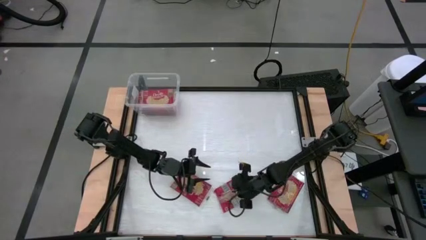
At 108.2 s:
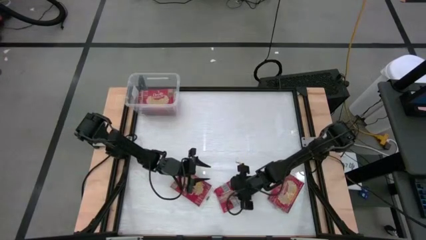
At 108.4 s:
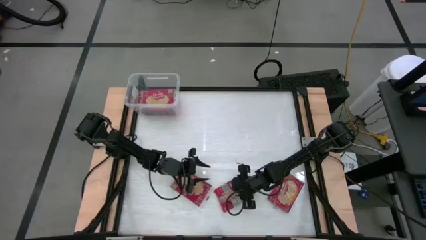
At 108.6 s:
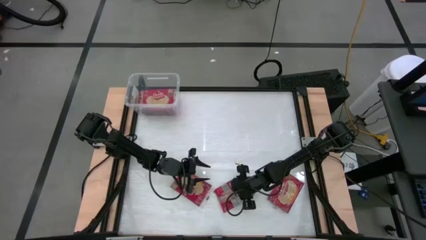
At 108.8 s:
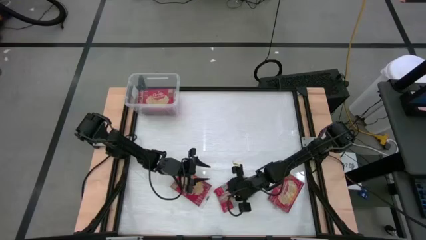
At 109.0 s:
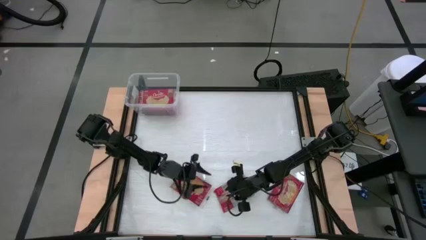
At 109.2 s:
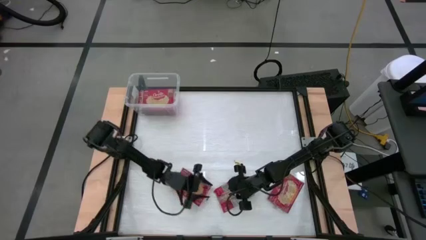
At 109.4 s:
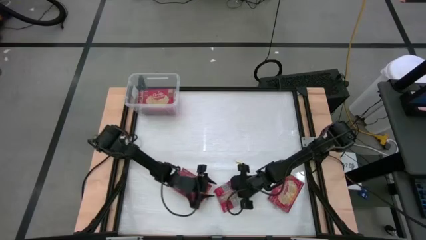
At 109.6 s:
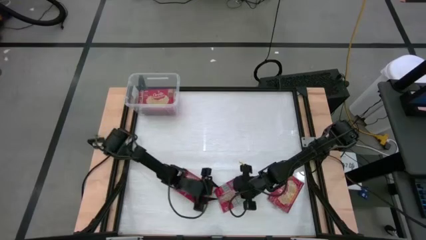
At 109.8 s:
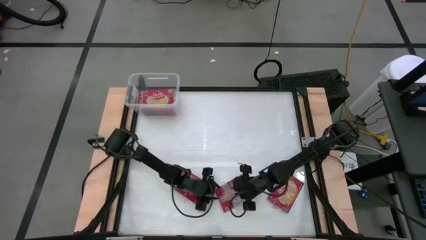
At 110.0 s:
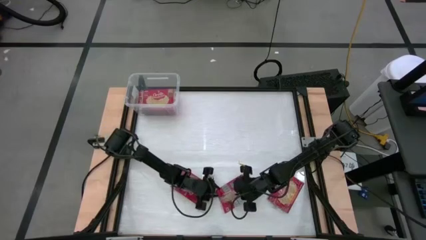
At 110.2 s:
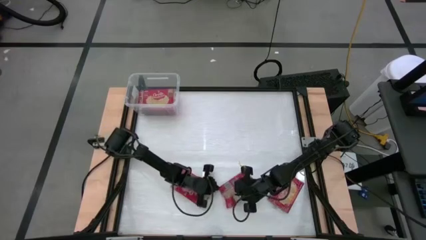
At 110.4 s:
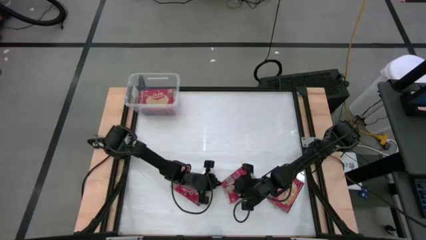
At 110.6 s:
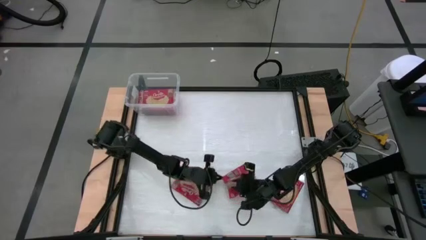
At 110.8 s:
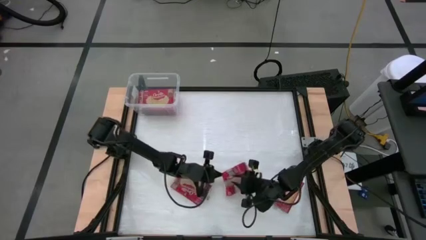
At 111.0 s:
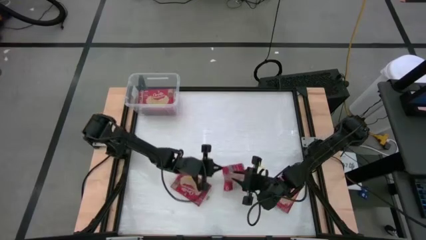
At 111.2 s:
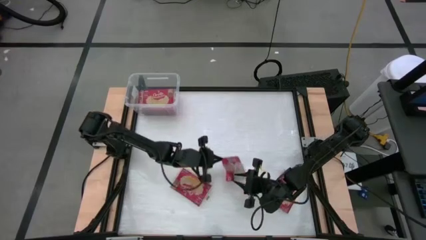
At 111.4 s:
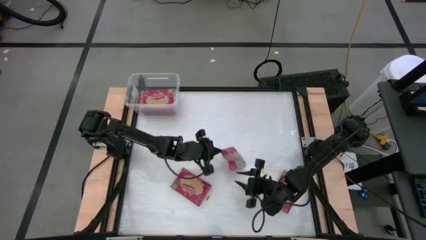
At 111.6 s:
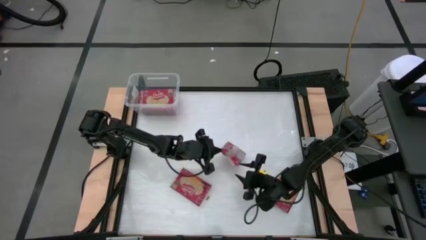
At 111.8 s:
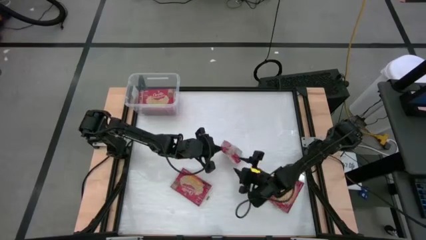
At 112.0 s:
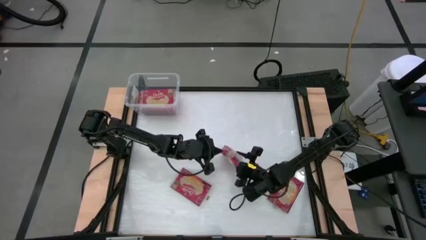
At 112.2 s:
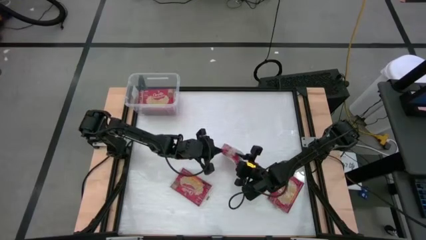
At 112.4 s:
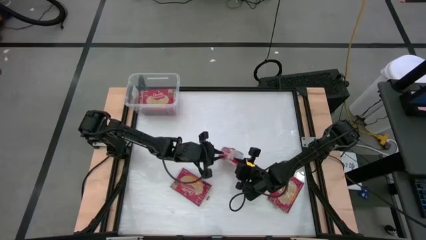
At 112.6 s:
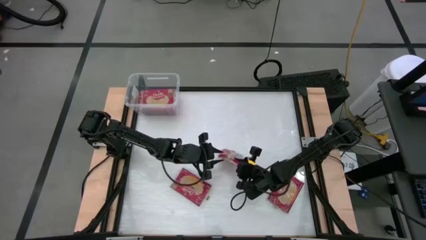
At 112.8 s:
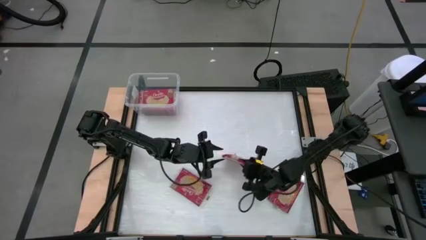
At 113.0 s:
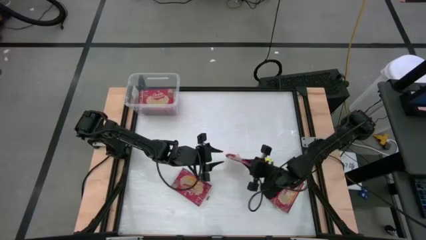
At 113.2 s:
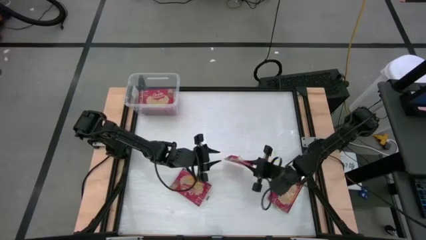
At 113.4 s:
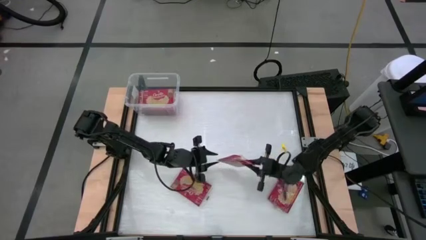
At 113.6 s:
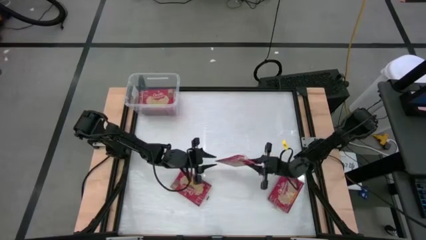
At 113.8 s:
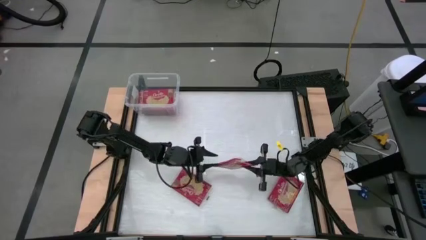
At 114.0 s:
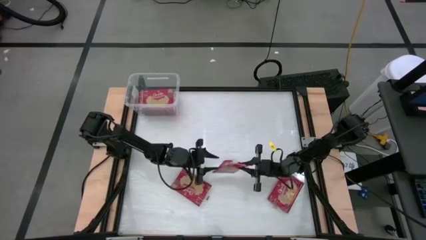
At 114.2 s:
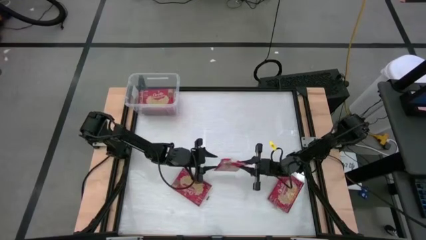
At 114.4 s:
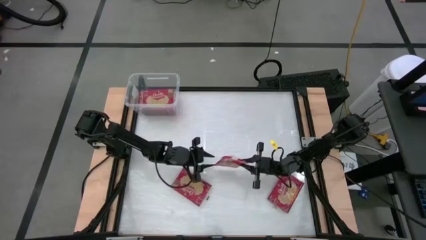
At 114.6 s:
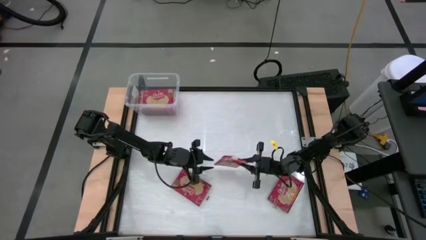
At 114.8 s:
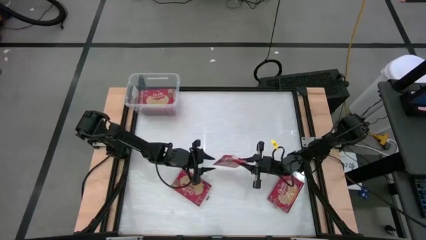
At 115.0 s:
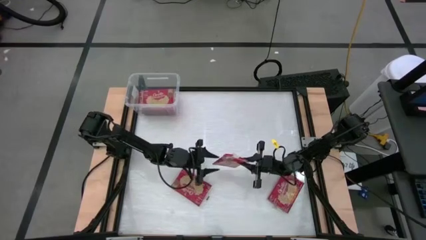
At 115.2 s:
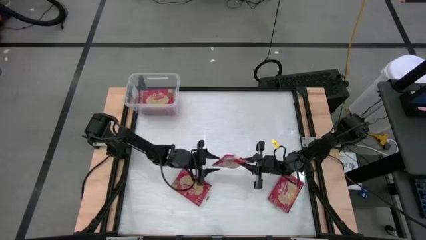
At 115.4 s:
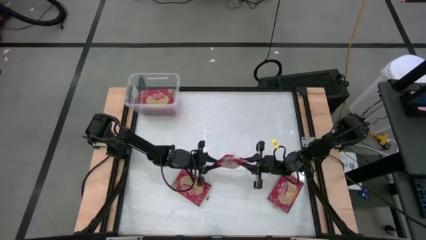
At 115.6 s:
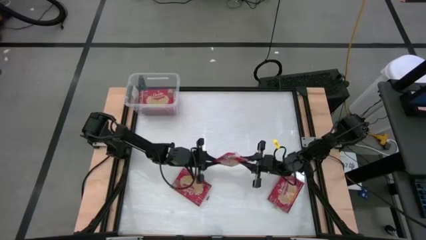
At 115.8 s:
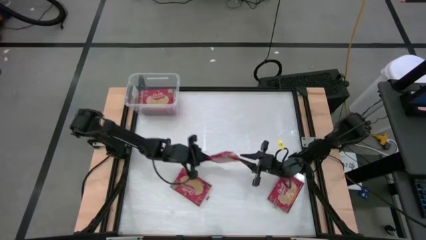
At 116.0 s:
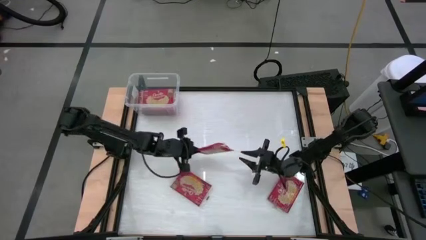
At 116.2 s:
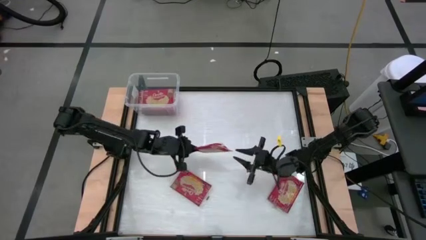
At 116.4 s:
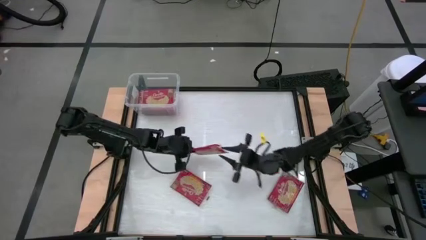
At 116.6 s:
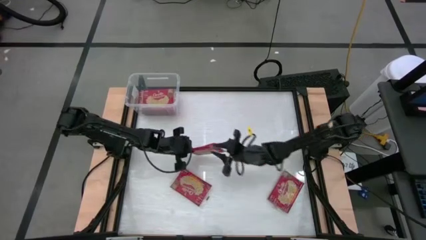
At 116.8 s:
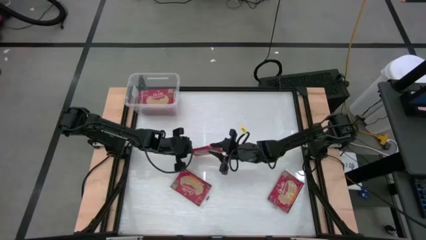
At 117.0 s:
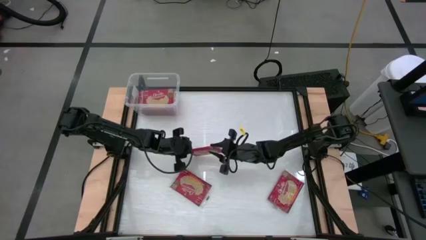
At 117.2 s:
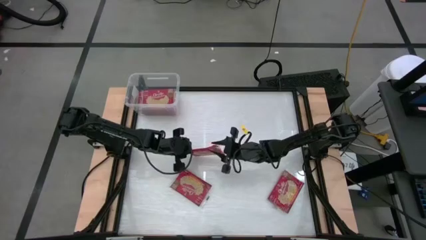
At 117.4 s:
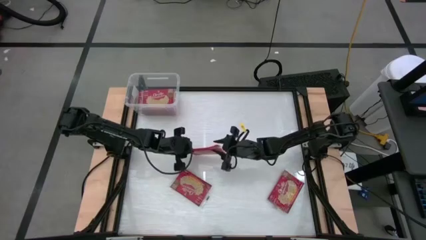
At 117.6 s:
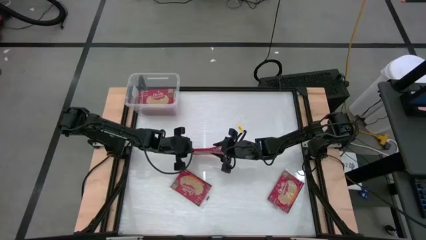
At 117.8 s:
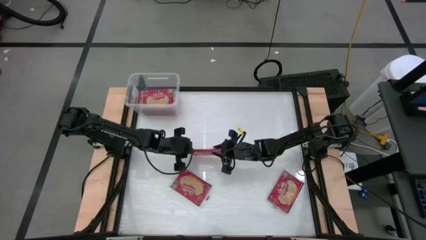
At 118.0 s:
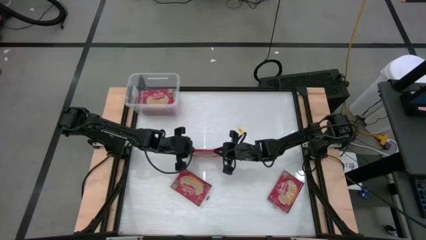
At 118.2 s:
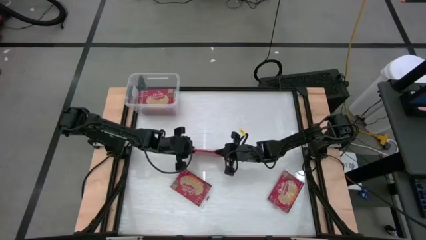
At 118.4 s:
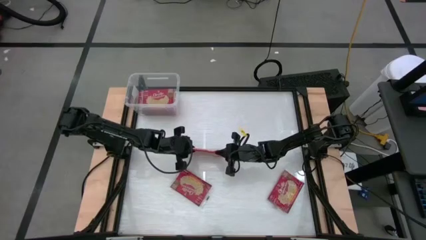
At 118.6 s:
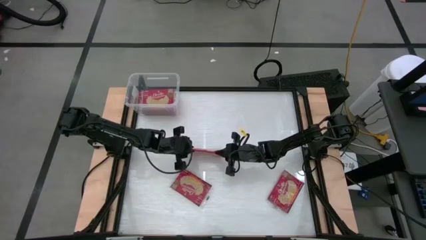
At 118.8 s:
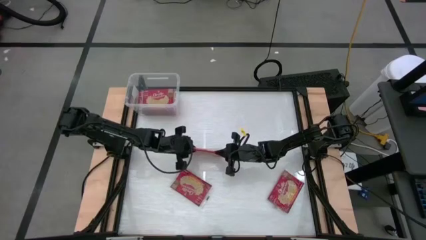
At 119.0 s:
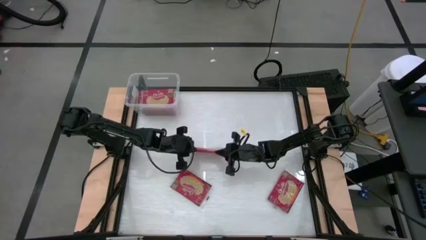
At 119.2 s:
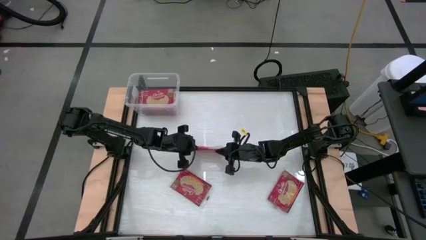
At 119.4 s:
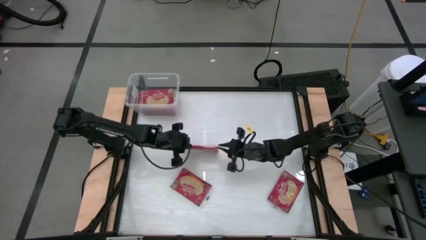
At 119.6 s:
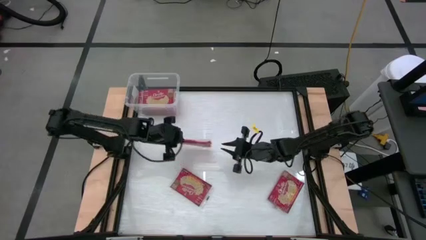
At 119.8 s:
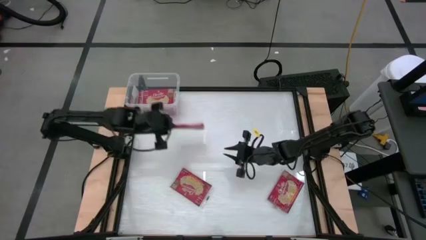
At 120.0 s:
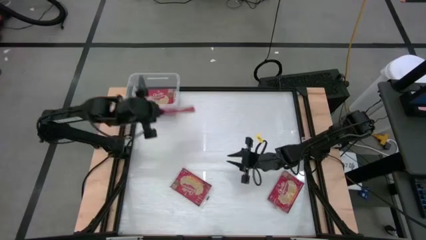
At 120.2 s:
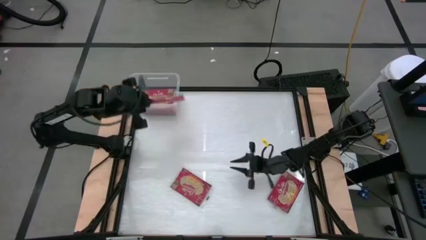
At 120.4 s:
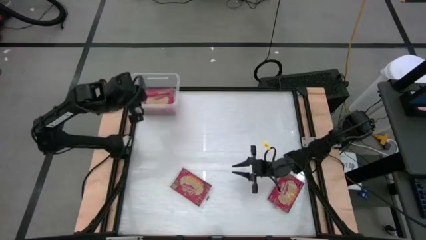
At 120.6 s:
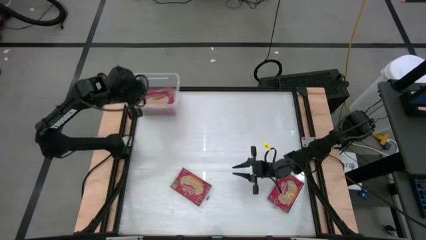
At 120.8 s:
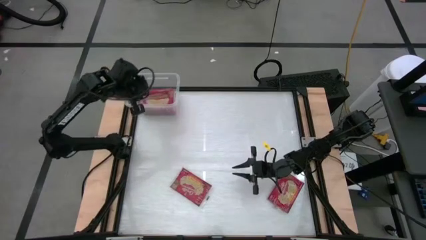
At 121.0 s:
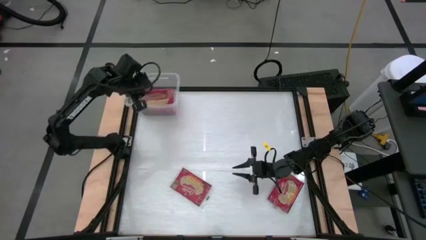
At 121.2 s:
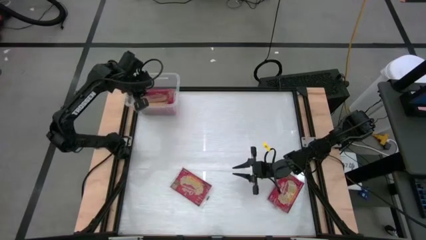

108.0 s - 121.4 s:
Task: Sort popcorn bags into baskets
Put the red popcorn bag into the transparent container

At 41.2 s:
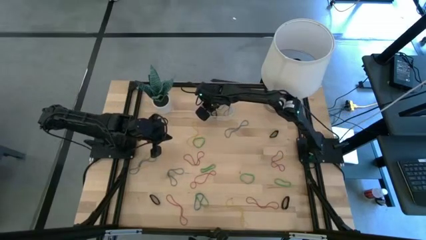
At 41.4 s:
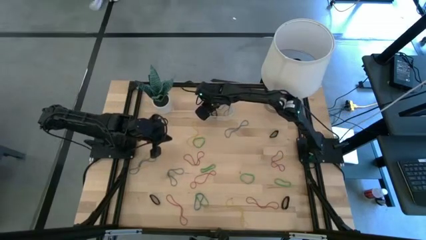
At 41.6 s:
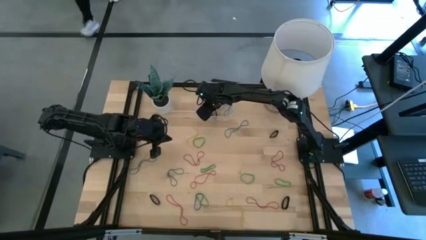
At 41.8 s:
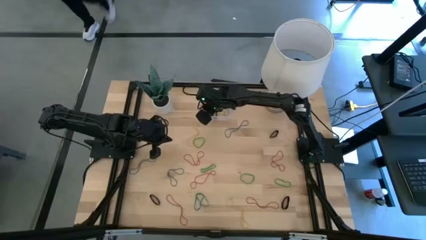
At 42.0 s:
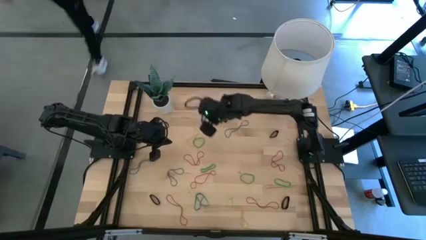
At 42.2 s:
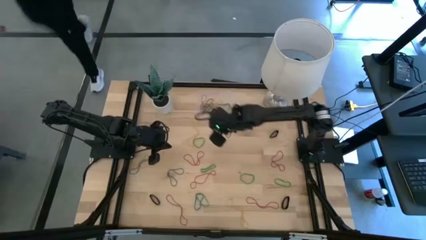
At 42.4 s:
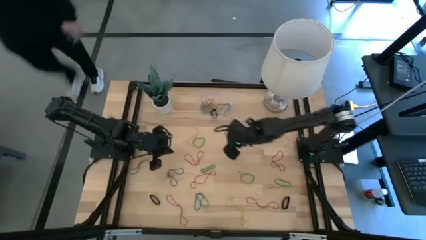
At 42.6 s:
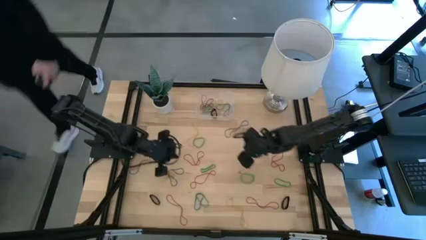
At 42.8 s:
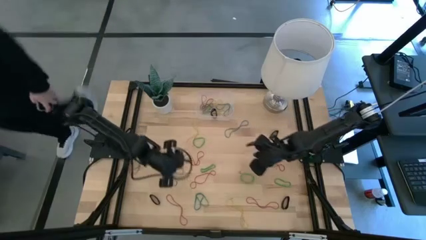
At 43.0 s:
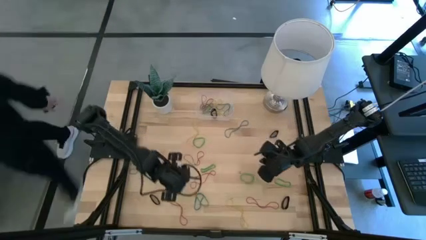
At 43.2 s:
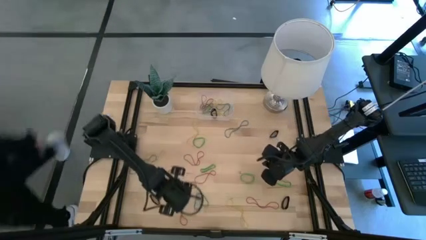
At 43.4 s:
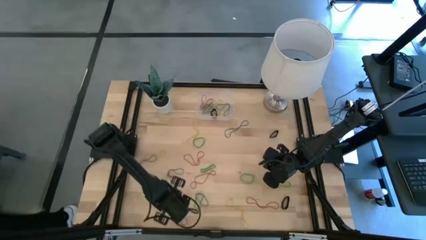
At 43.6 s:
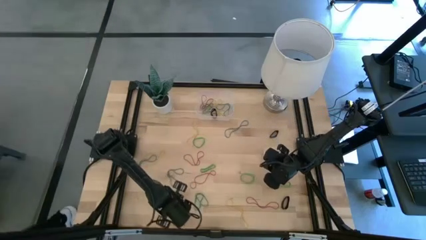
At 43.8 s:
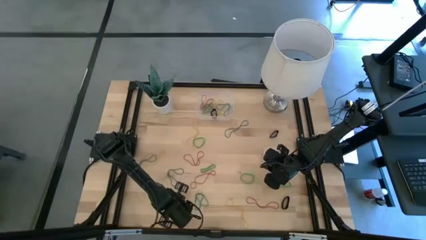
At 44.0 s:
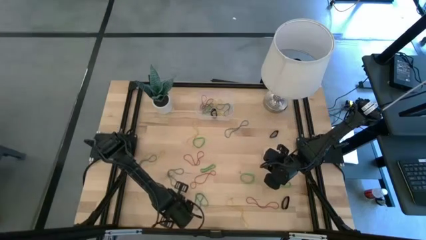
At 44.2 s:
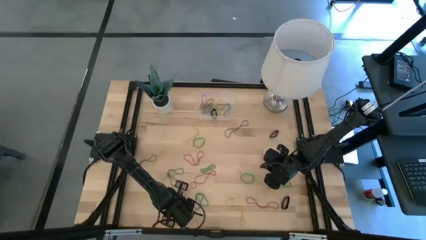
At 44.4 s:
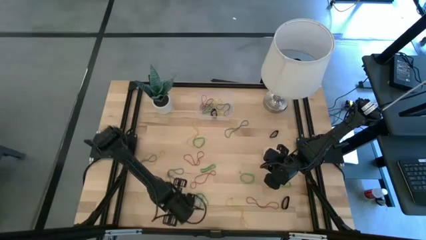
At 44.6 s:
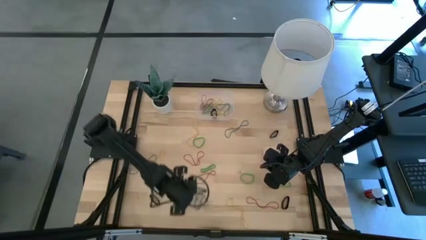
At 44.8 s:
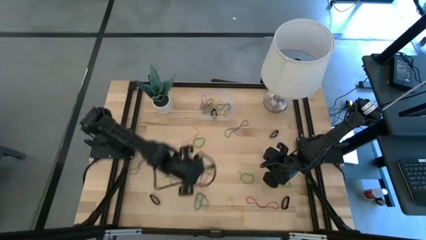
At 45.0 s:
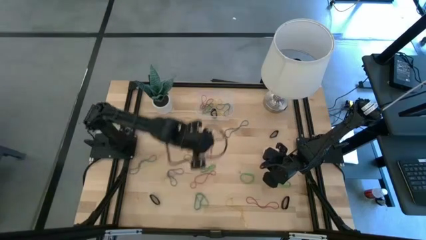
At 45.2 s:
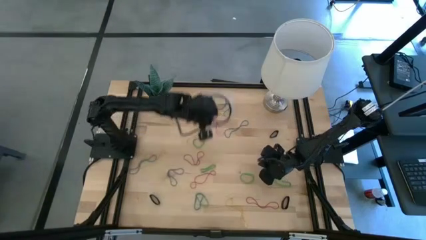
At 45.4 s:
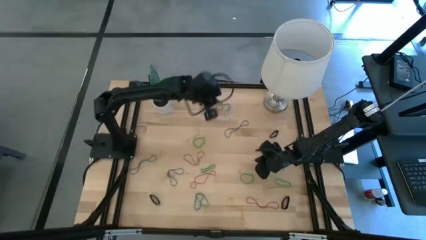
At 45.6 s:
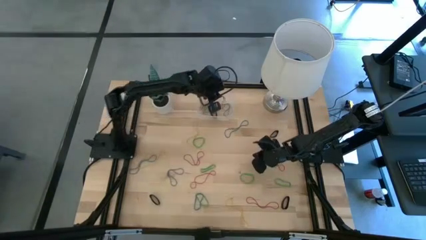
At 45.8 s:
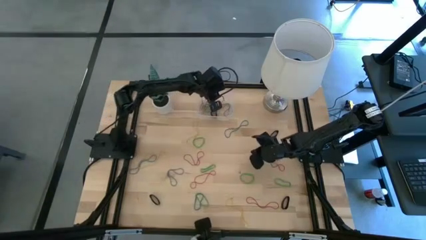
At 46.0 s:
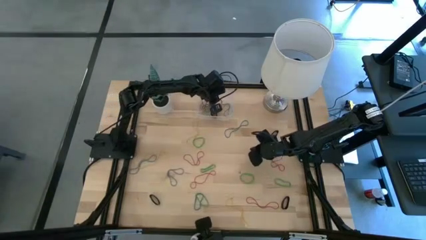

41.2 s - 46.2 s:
Task: Pick and place rubber bands into bin
Put the red rubber band into the transparent bin
